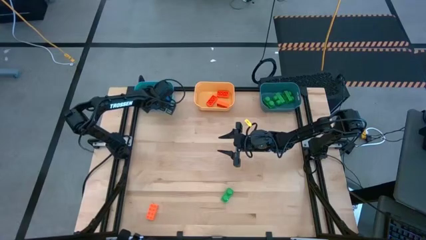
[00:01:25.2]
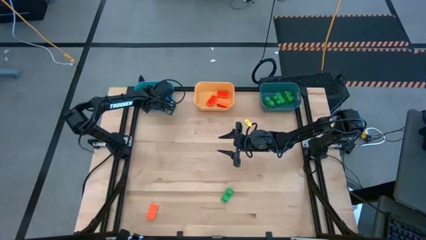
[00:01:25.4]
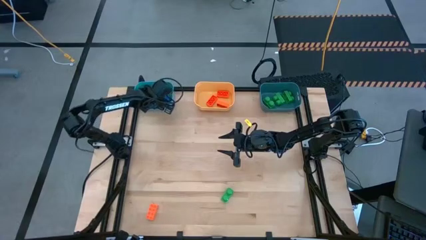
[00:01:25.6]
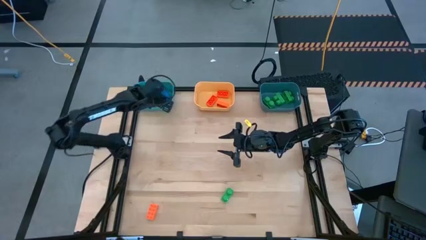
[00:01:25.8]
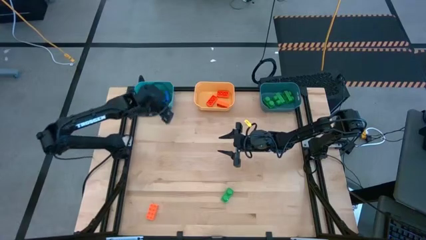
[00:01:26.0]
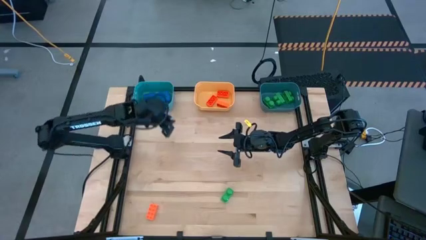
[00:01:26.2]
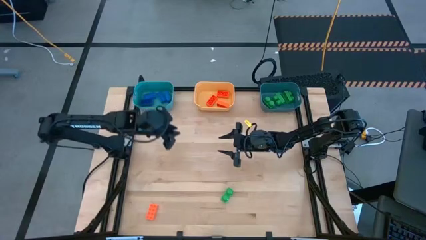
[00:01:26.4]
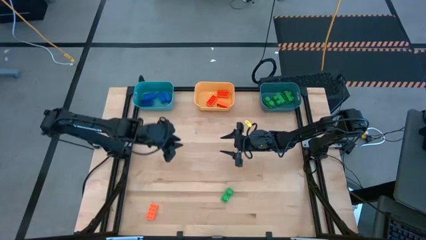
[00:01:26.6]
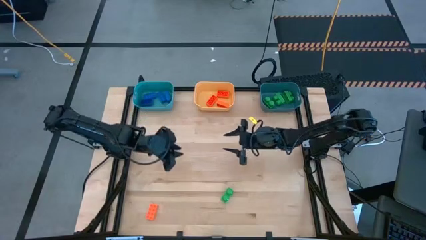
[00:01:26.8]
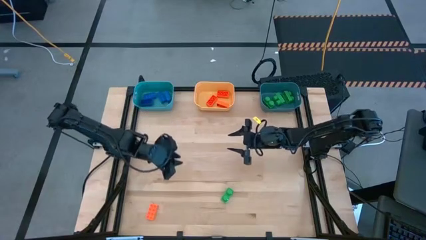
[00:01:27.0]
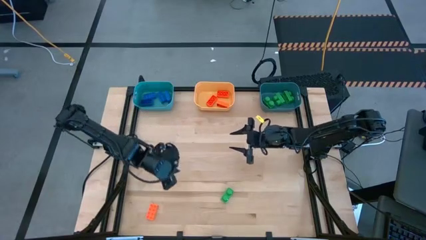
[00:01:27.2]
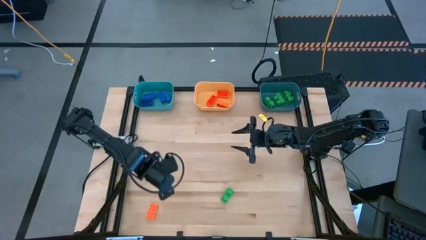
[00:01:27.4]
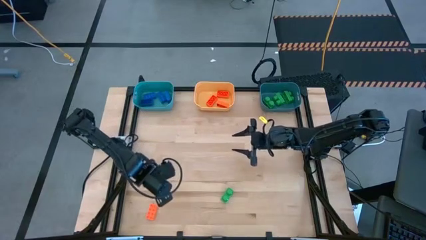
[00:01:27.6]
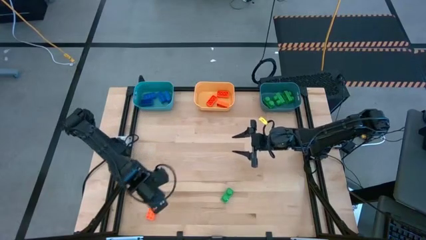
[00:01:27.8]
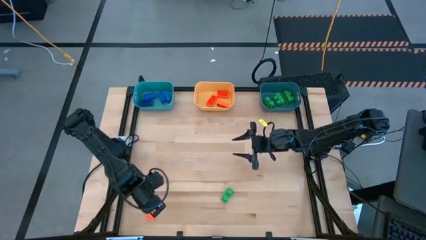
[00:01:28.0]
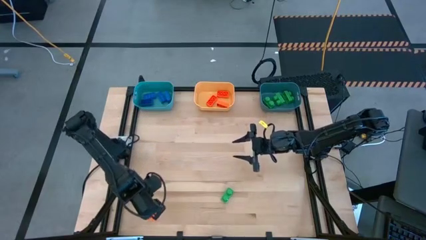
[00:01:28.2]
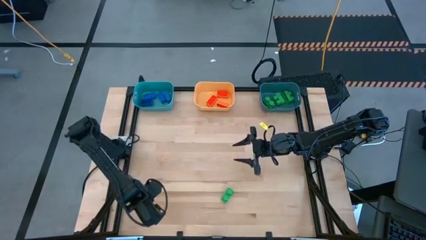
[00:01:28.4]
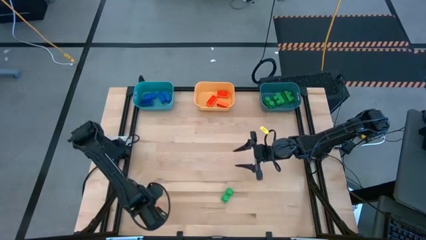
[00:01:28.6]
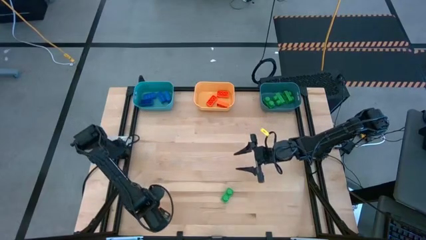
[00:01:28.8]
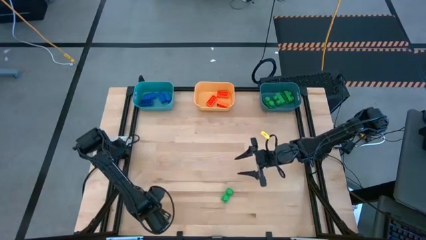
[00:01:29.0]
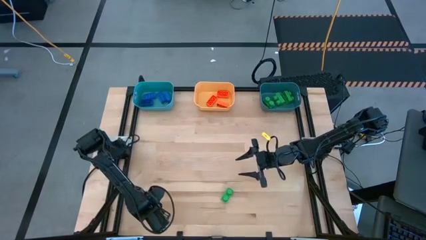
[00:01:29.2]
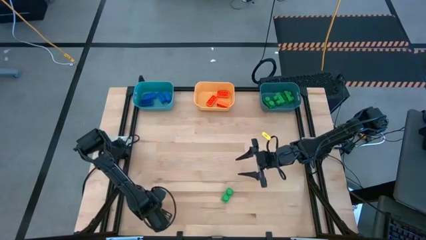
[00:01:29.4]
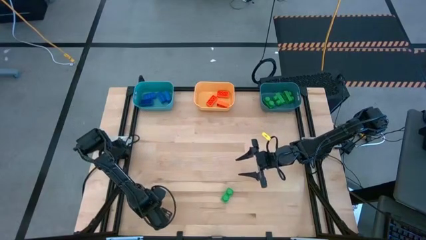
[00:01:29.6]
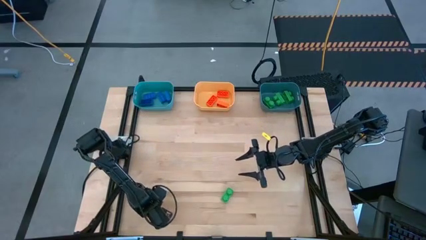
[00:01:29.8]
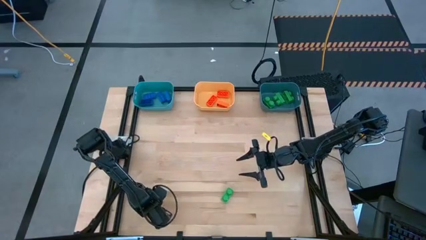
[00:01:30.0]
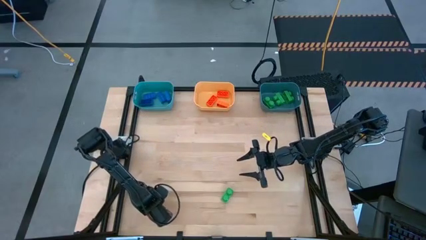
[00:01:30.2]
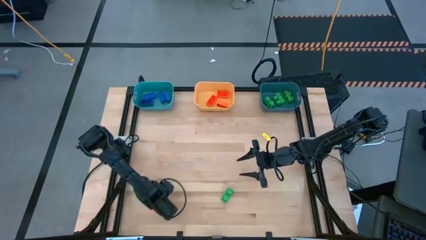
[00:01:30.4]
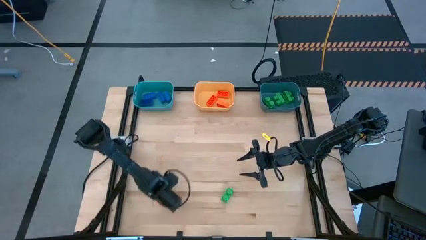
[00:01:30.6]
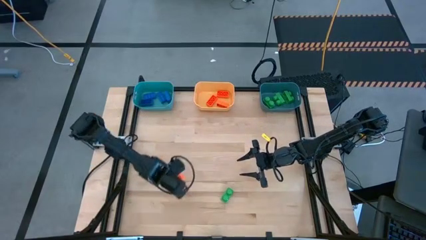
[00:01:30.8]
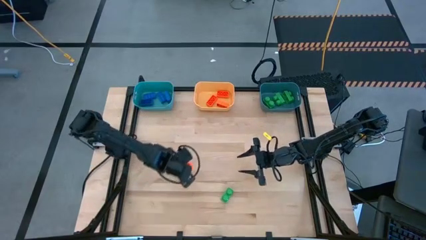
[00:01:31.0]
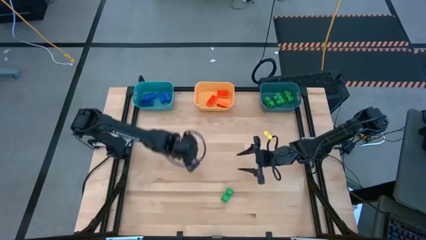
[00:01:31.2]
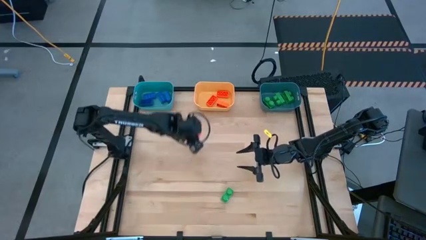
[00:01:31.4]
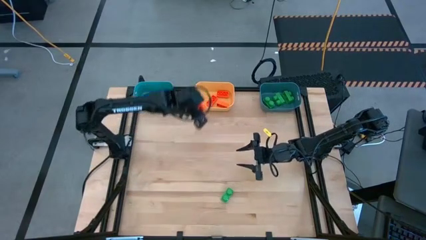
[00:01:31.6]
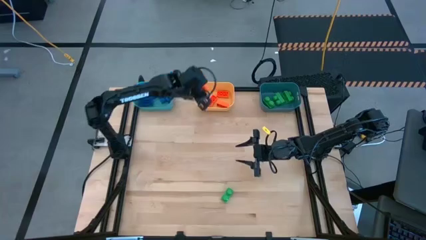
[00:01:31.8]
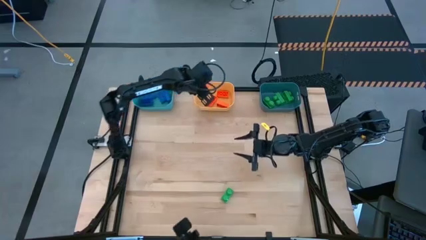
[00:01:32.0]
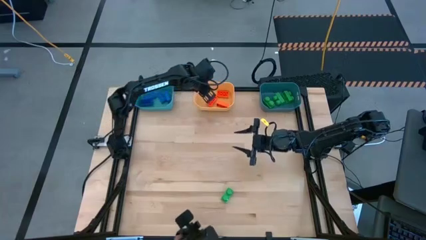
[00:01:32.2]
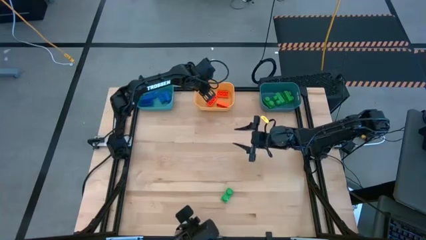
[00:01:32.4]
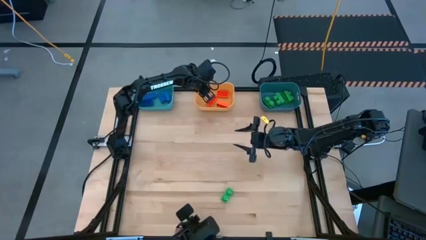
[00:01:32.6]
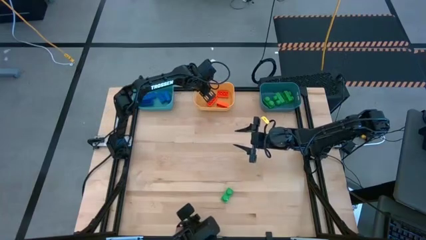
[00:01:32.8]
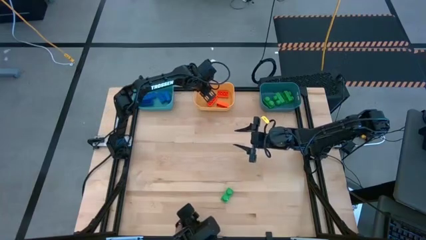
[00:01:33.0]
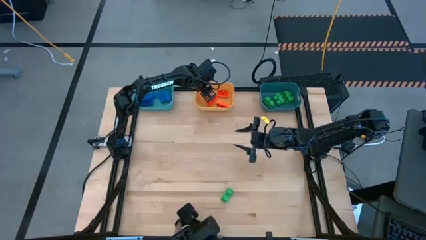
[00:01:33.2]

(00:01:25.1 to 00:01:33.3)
Task: Sort & place blocks by color
Put the orange game piece into the yellow bin

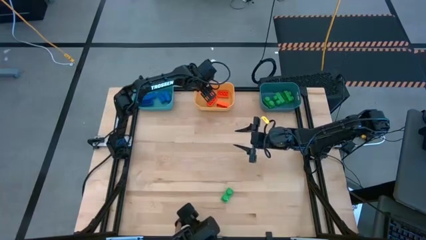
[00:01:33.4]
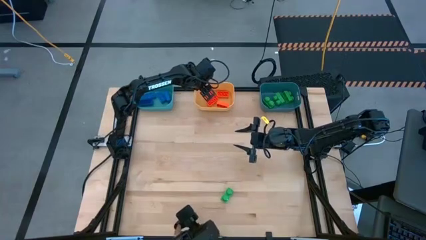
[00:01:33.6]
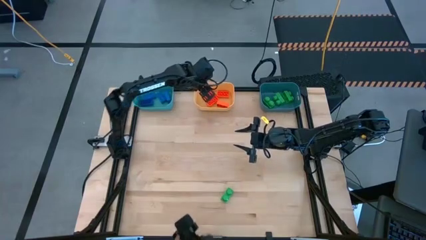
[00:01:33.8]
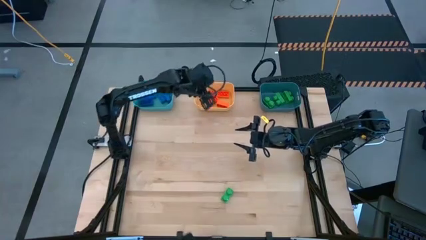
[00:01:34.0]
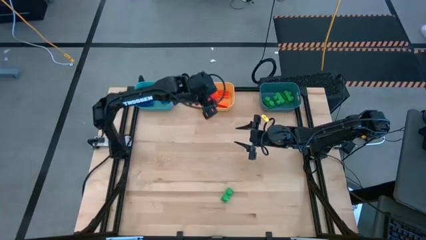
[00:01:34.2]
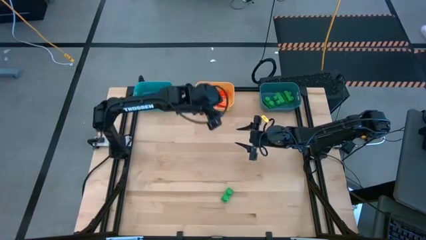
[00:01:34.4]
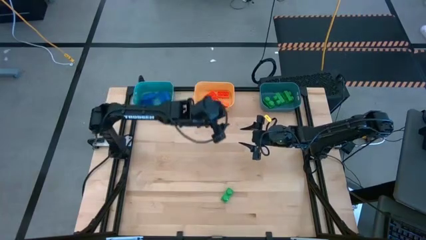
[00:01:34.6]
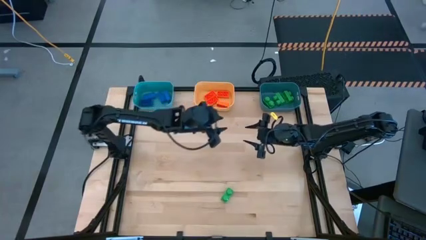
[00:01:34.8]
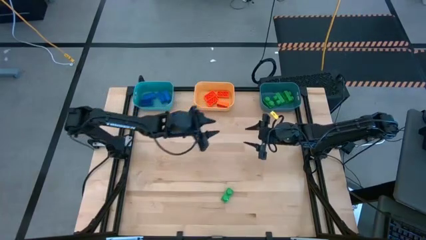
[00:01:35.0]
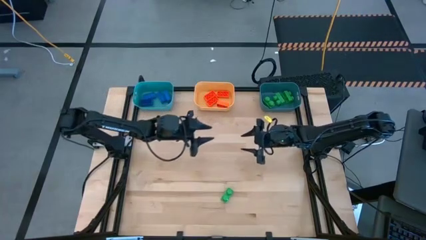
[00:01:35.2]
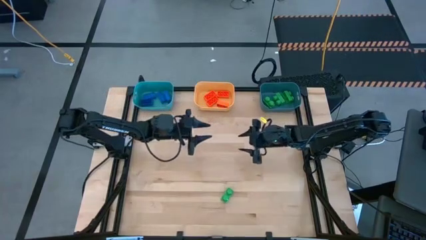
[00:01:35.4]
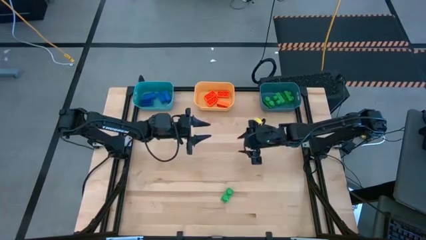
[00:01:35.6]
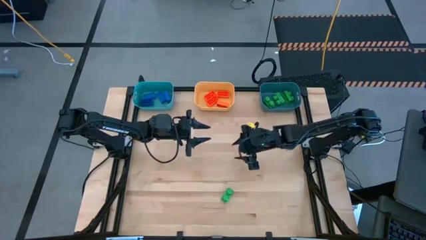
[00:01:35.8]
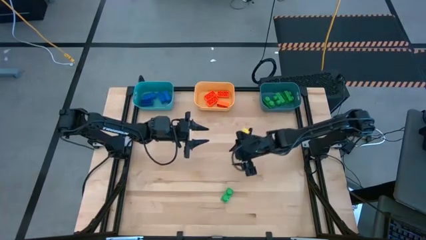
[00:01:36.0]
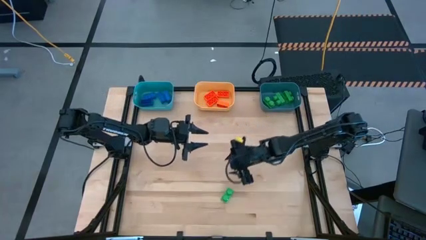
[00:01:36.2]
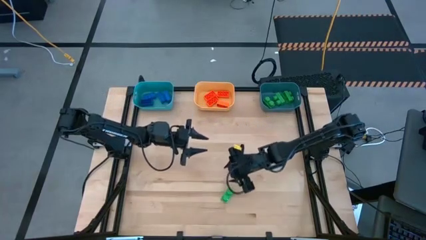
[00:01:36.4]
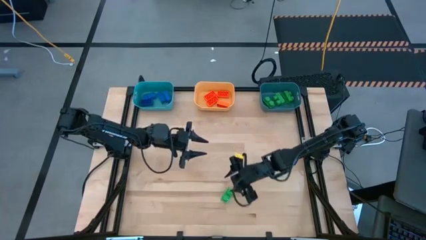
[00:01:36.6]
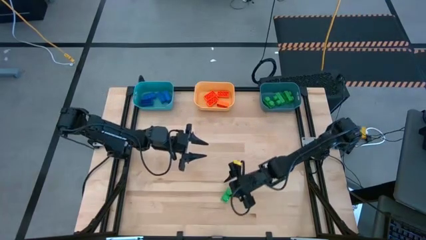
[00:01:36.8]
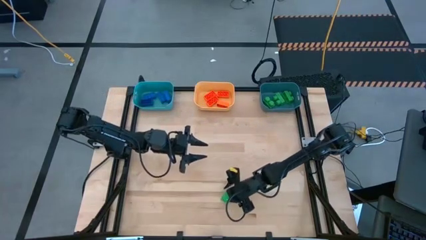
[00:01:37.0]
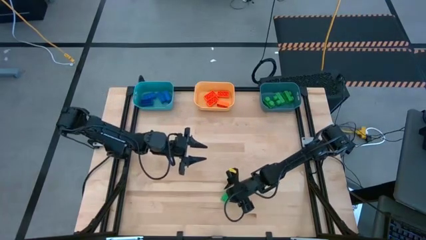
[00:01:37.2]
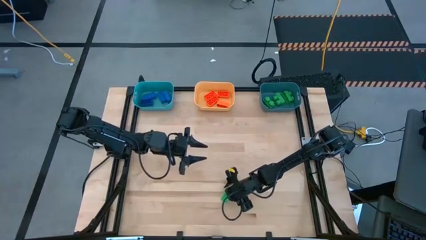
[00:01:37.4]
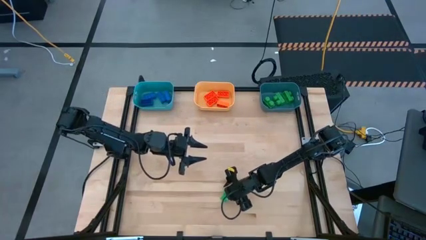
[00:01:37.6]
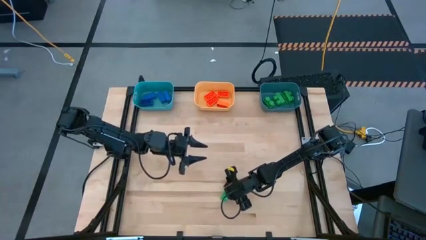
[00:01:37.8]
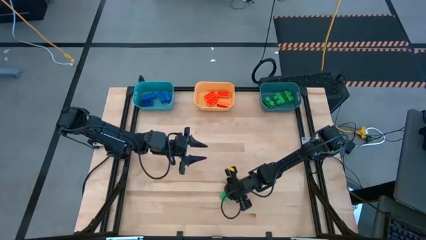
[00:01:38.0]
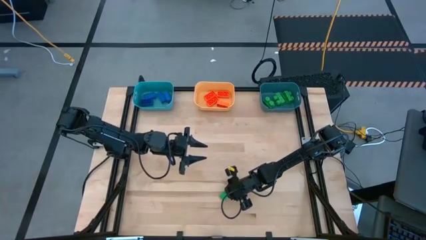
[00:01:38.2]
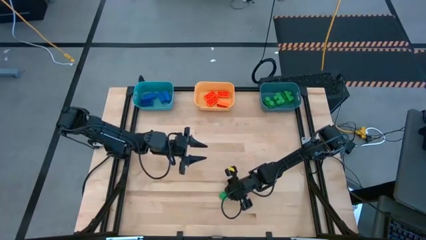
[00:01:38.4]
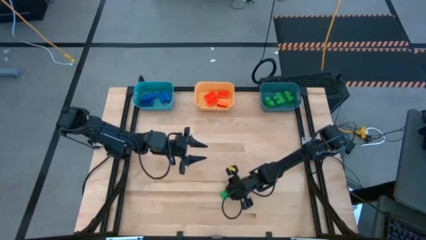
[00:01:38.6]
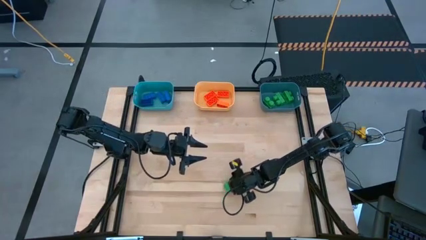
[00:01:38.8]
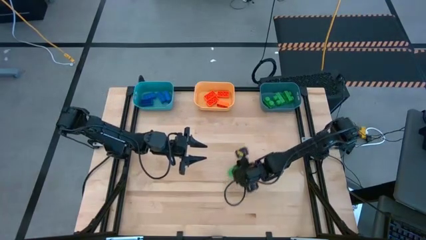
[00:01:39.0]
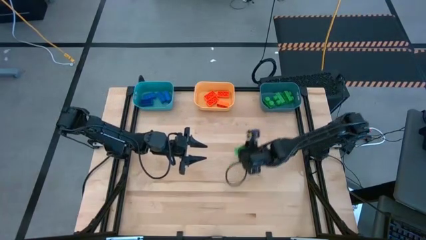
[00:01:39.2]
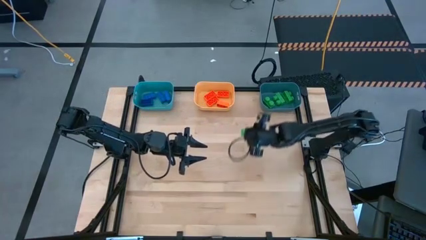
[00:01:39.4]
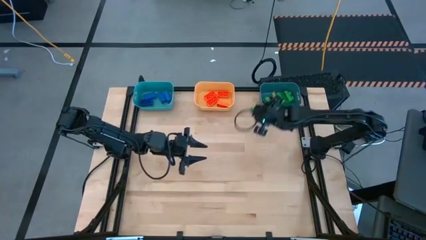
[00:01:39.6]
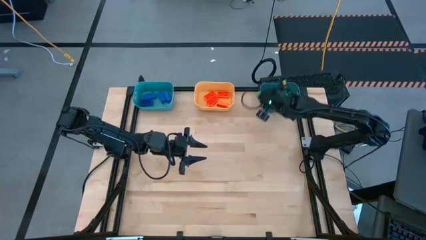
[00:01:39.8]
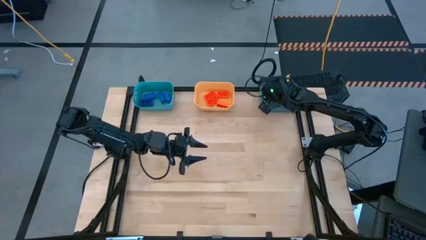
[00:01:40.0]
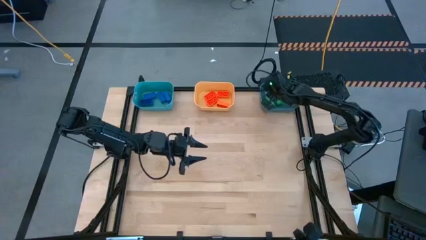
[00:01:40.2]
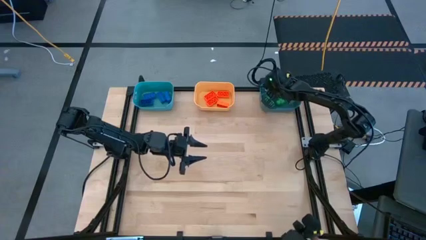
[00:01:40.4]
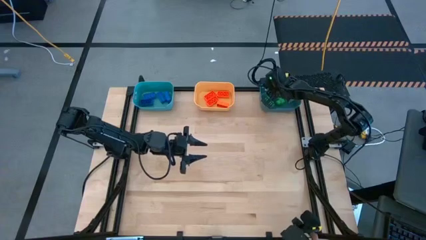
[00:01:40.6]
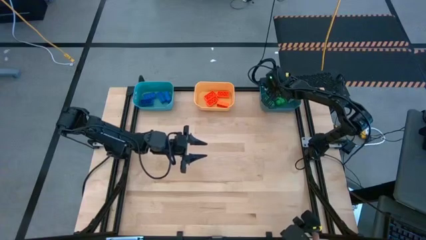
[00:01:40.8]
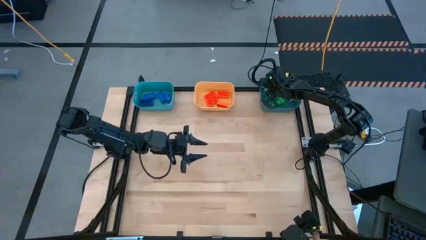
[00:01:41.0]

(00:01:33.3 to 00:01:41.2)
Put the green game piece into the dark blue bin
